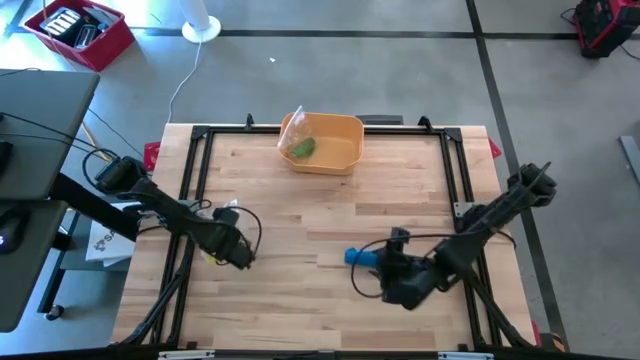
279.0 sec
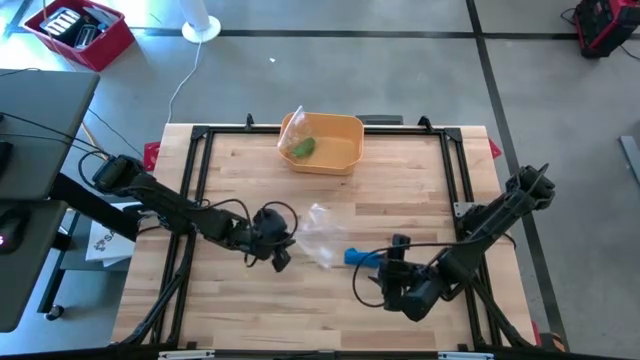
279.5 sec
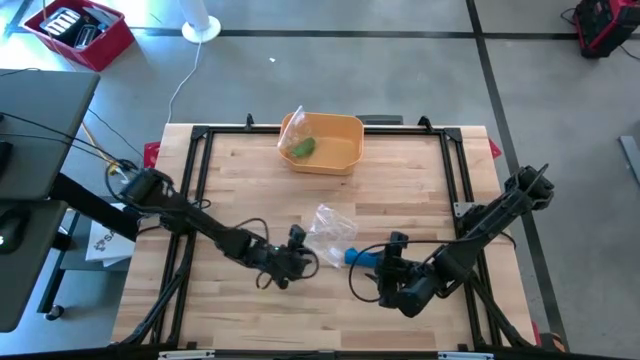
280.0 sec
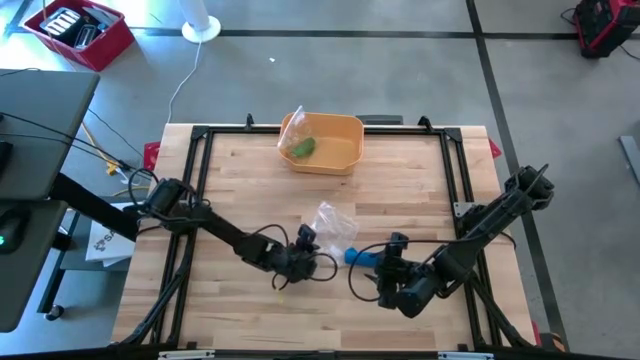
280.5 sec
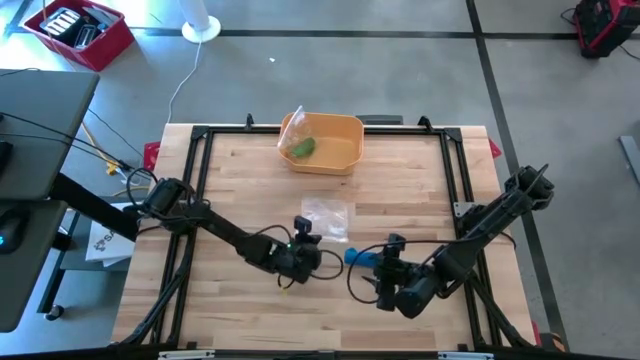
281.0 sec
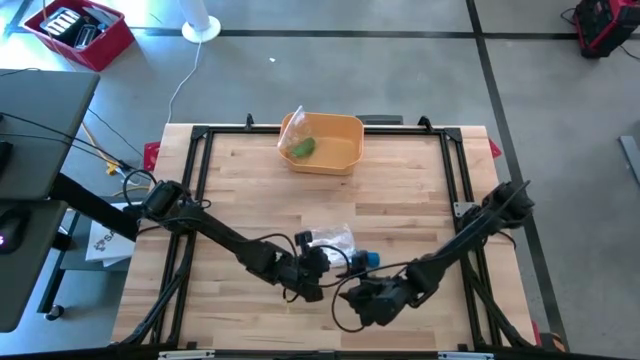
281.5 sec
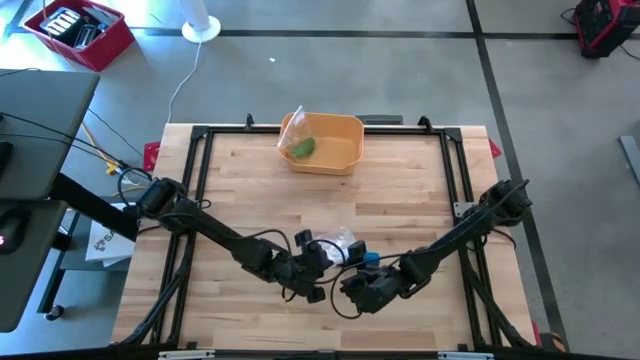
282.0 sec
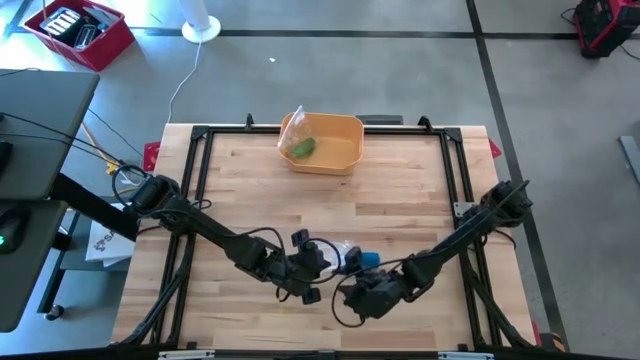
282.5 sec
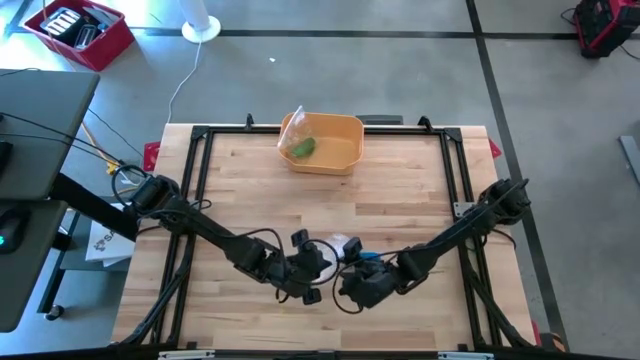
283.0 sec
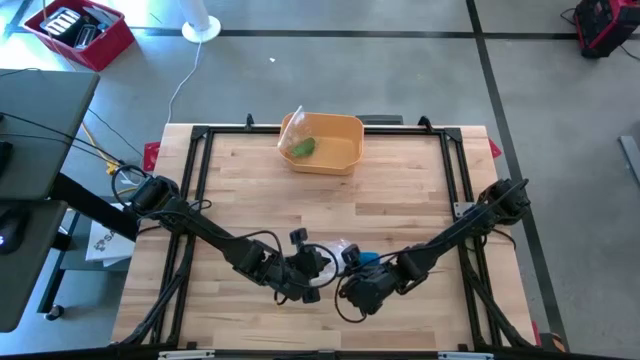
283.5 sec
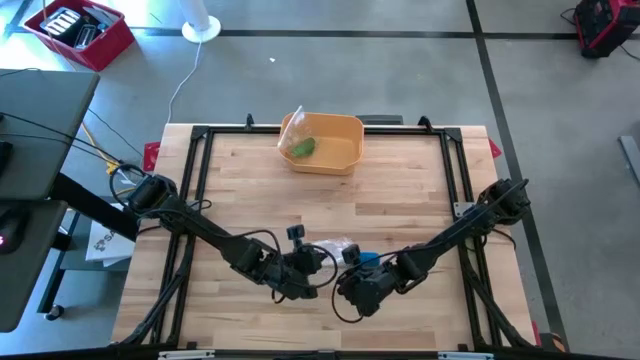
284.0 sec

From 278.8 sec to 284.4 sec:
Task: Roll bandage
Put the blue bandage to the zip bag

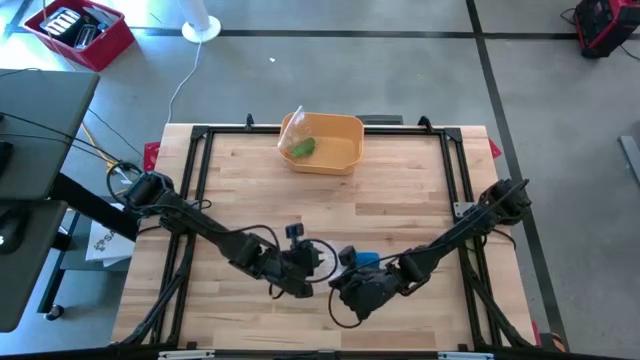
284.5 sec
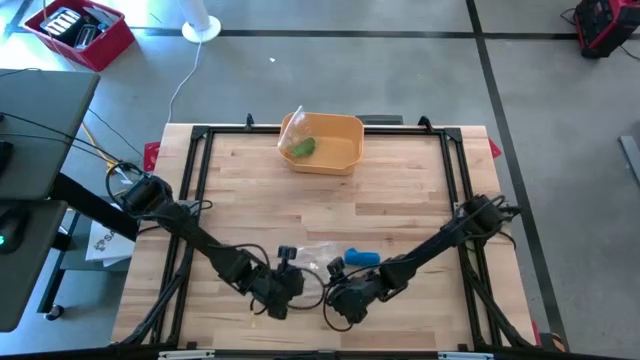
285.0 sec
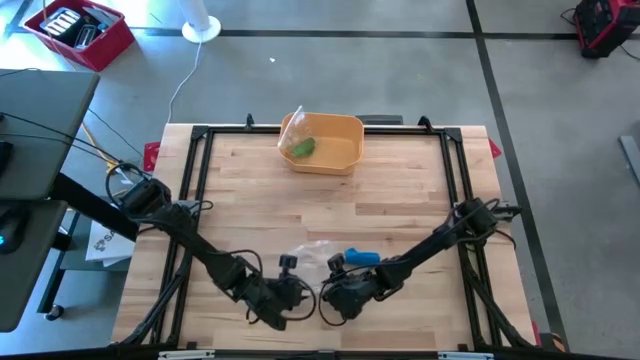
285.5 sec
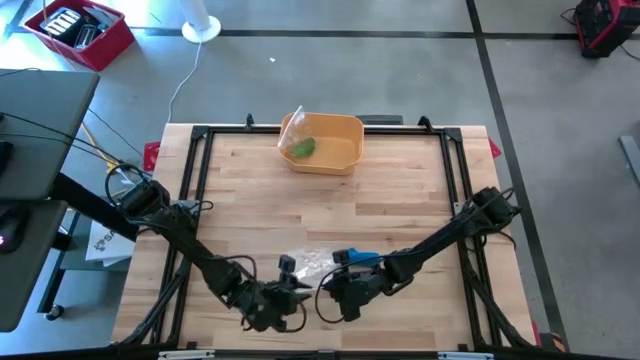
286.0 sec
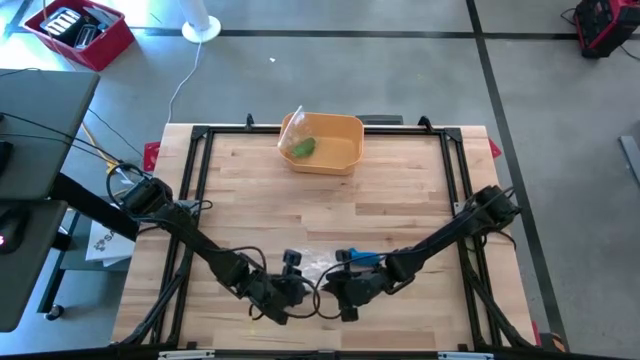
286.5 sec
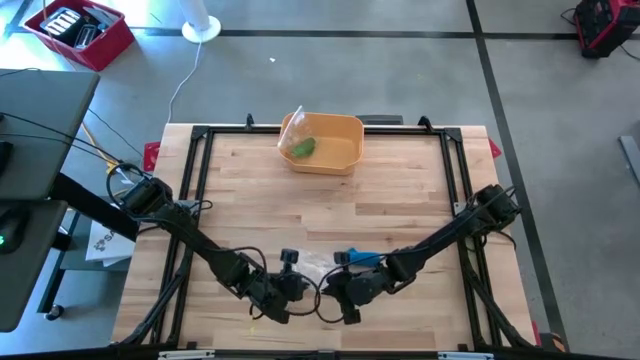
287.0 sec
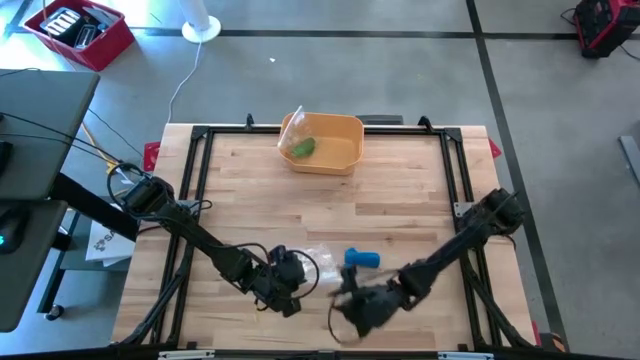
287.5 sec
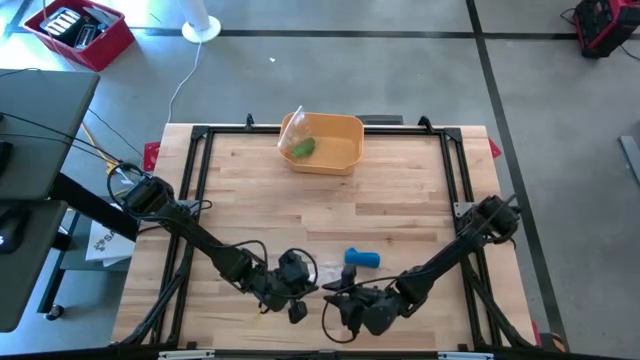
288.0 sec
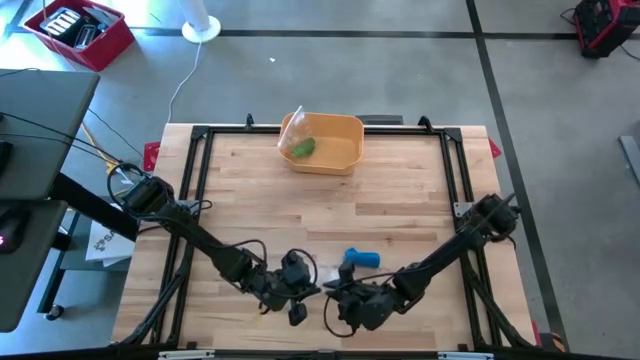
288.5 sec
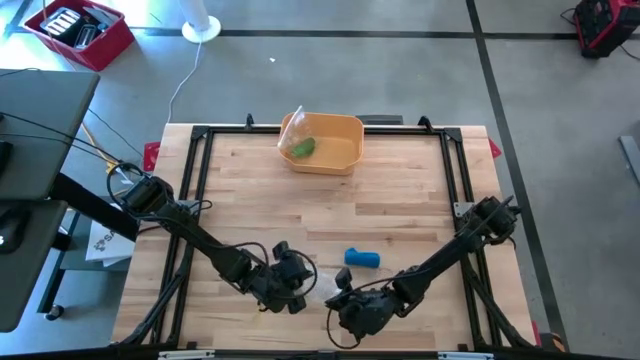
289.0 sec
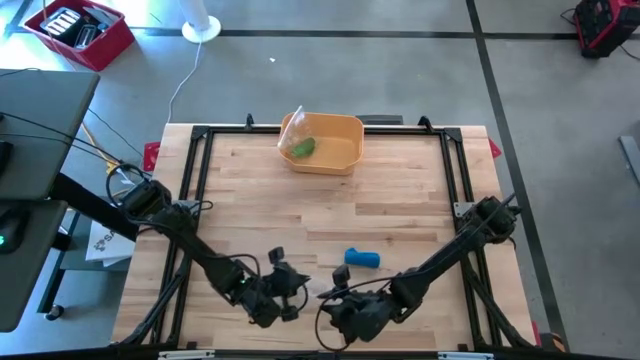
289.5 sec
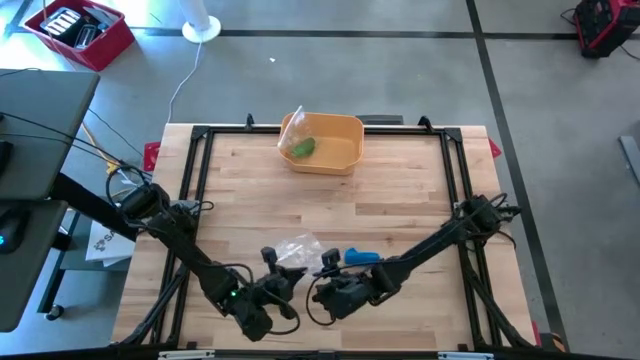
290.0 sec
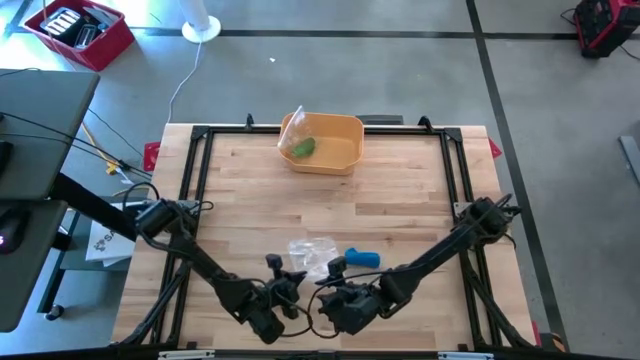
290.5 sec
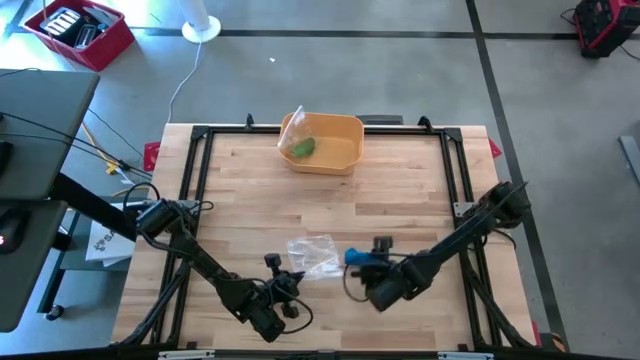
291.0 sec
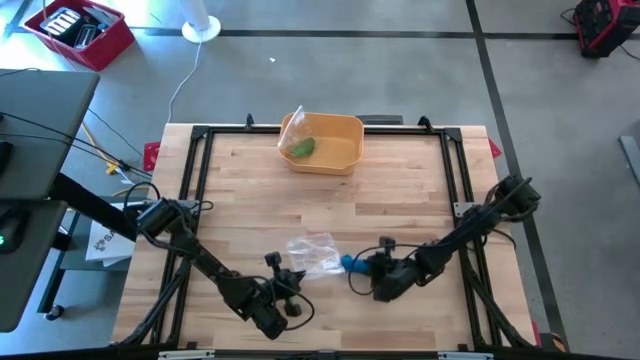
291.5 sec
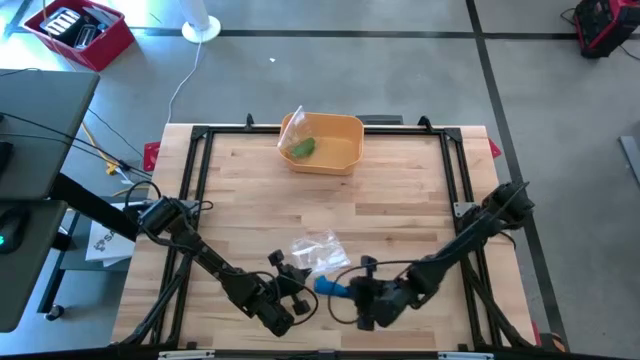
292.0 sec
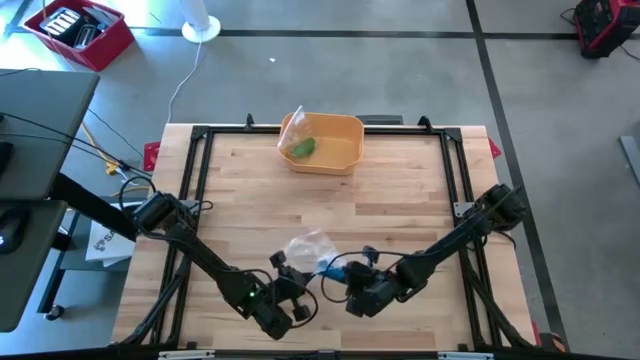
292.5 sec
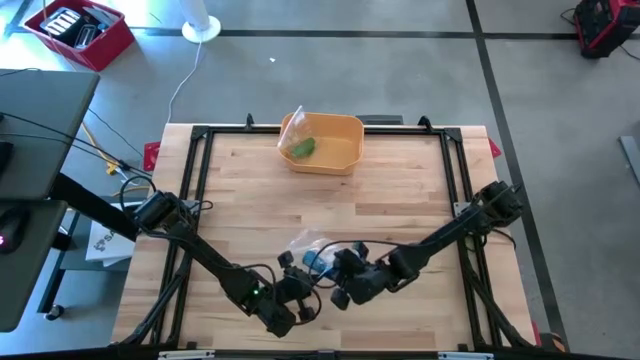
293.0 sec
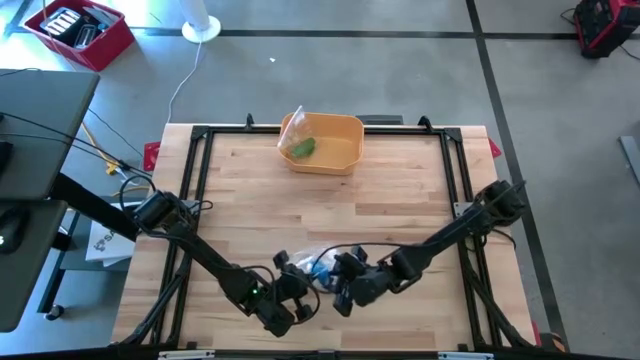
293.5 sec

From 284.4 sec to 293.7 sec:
Put the blue bandage to the zip bag

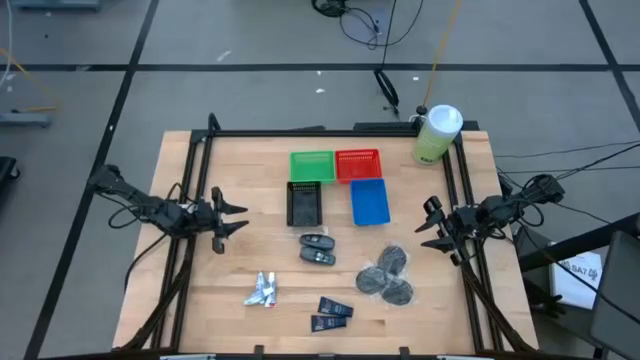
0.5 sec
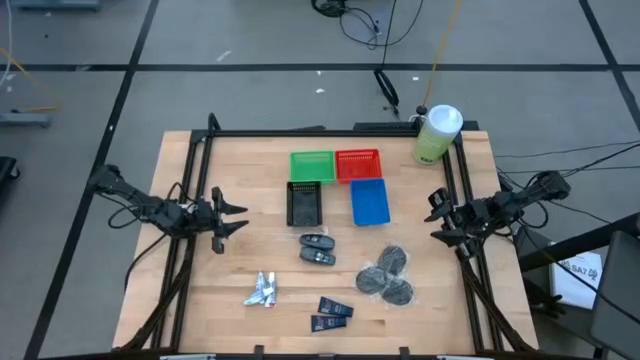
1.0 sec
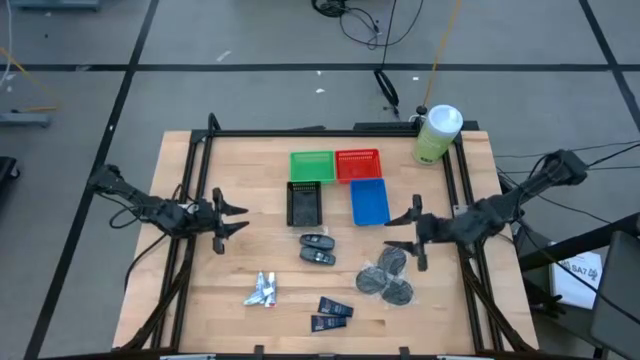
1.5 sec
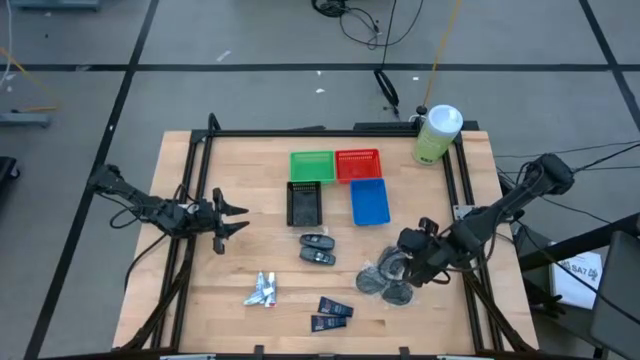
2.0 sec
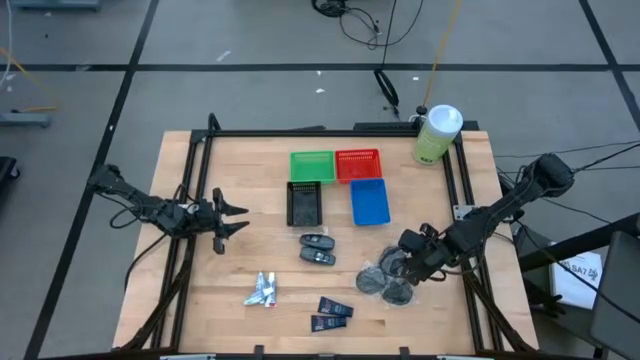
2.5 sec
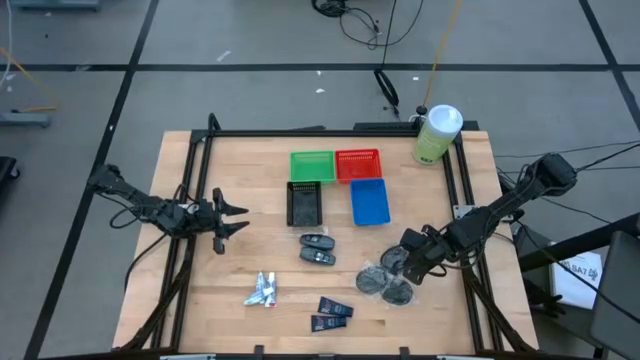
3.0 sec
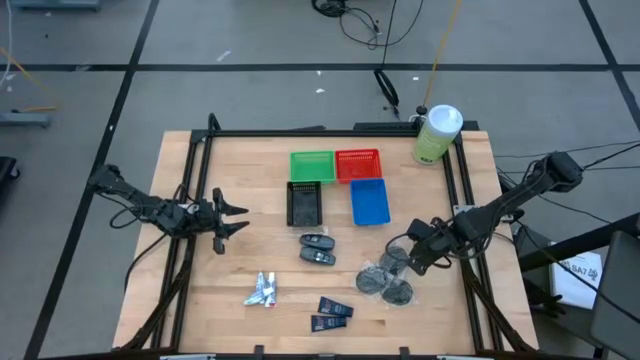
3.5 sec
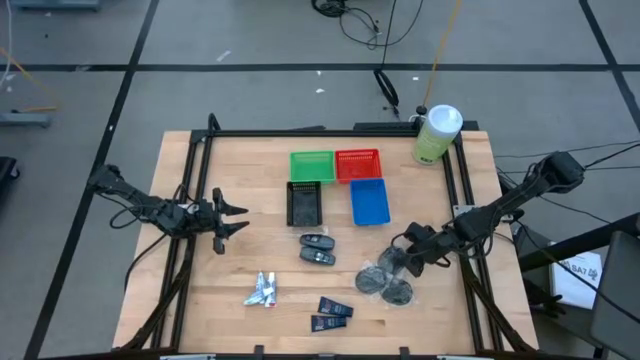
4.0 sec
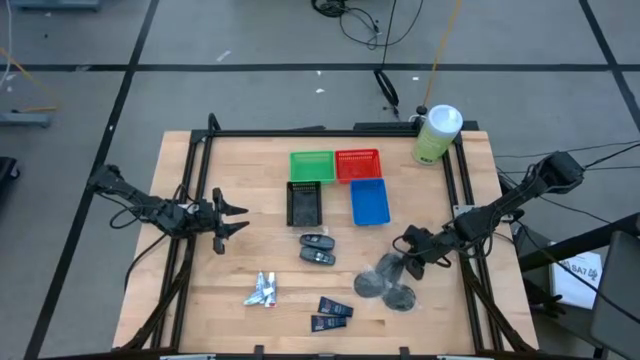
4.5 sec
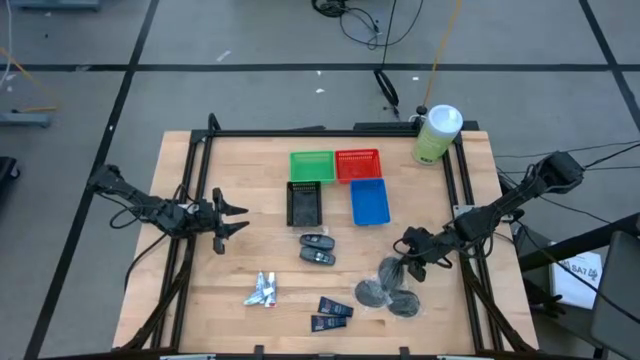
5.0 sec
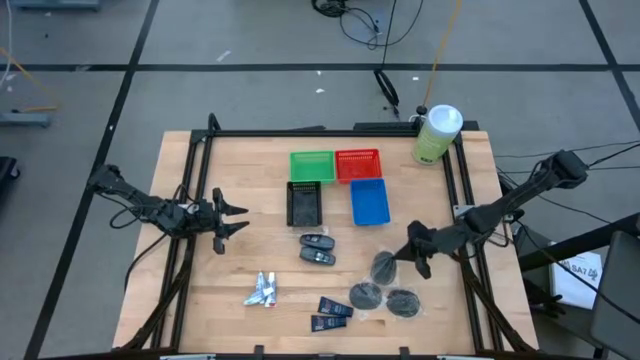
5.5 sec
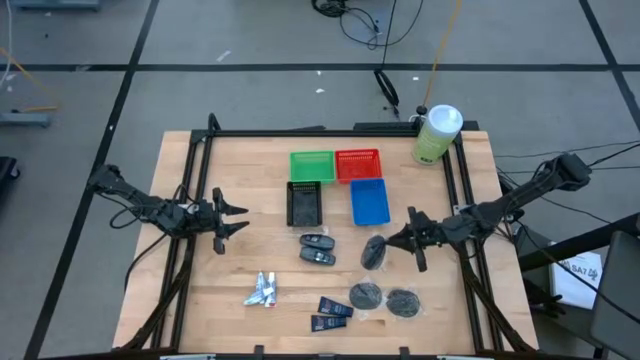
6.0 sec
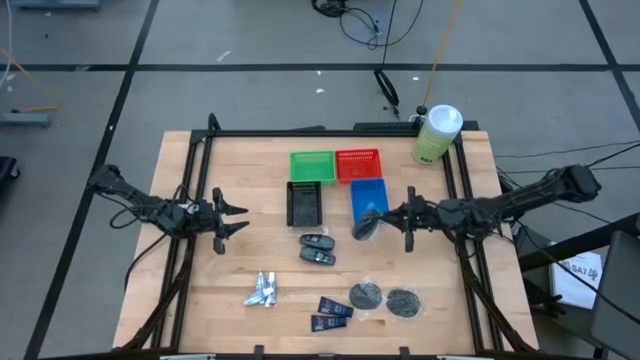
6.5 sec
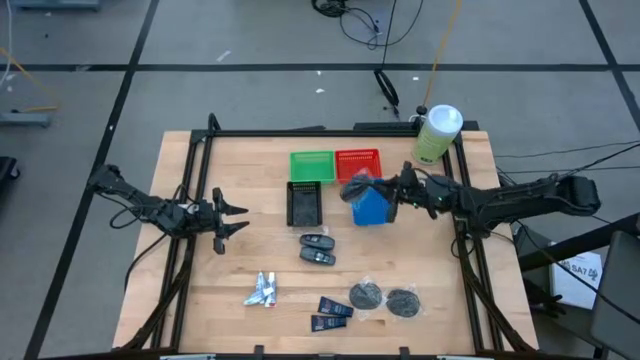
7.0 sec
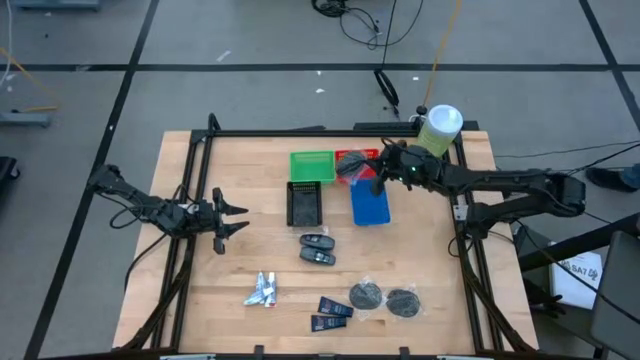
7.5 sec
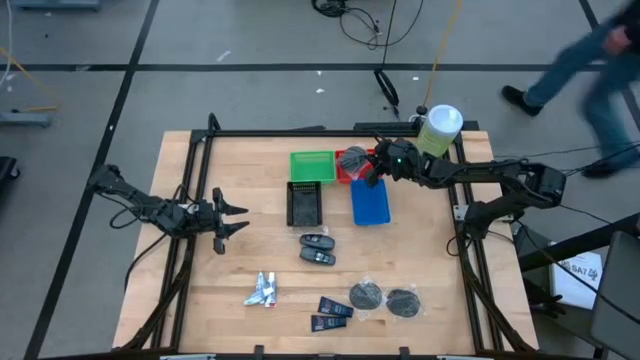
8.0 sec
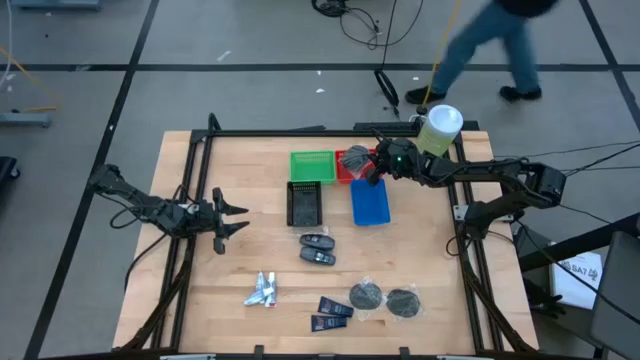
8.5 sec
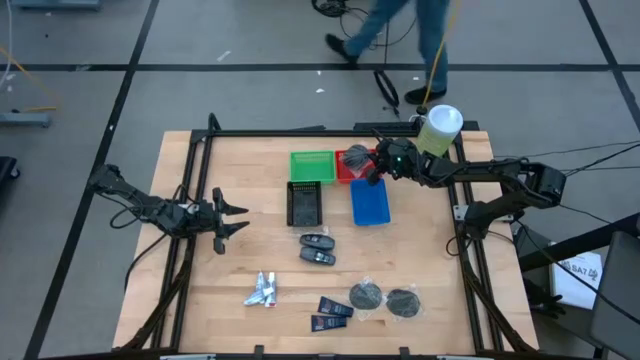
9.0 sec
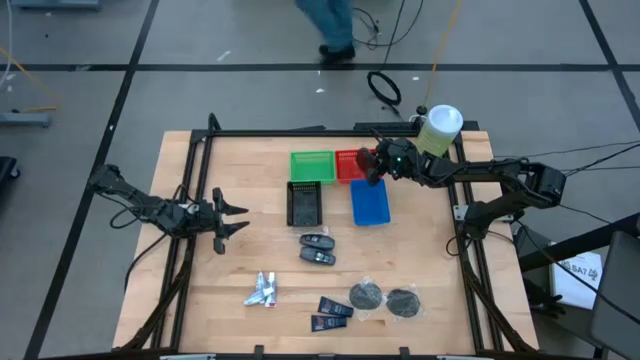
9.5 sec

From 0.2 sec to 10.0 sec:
Task: Pick & Place Travel size toiletries
Put the top right black hairbrush into the red bin
